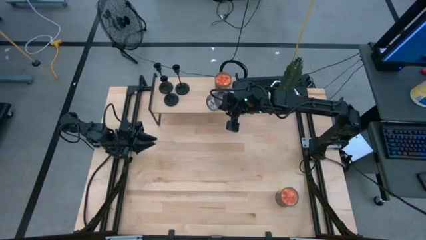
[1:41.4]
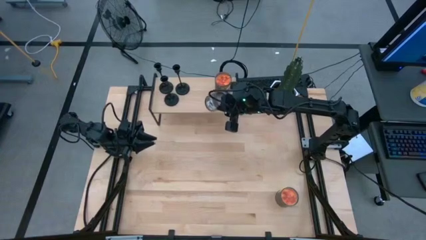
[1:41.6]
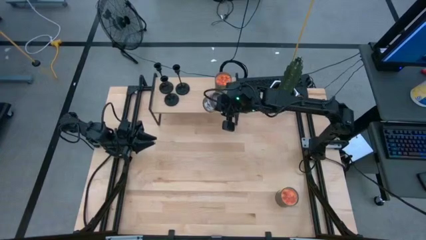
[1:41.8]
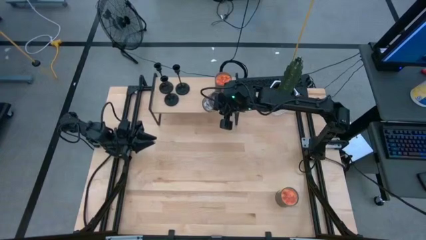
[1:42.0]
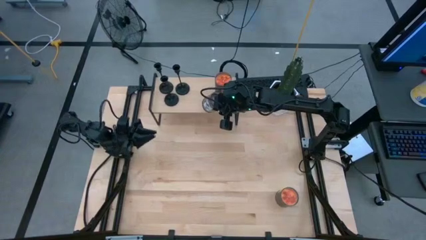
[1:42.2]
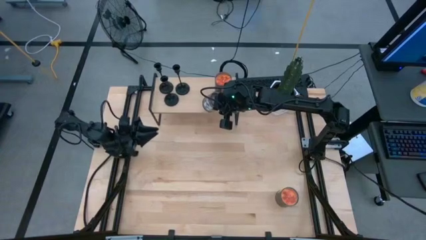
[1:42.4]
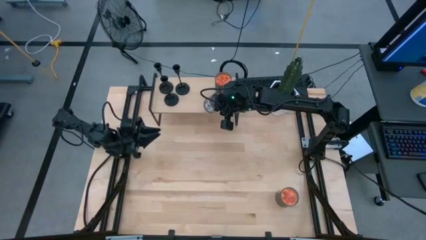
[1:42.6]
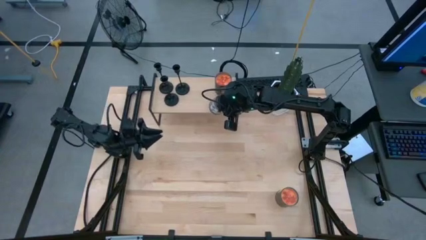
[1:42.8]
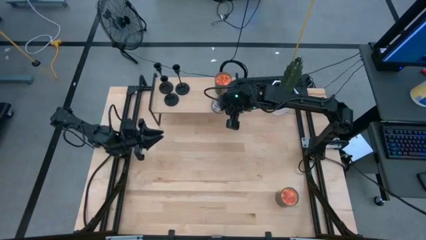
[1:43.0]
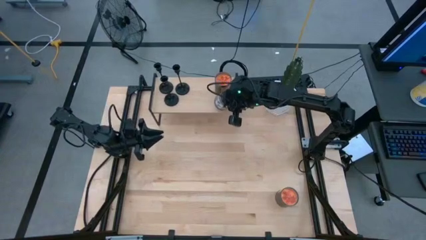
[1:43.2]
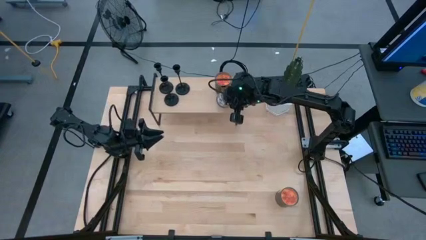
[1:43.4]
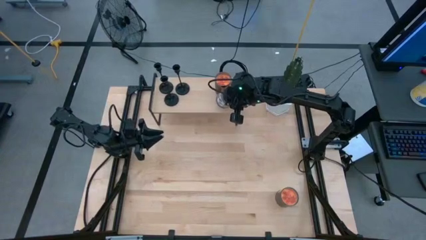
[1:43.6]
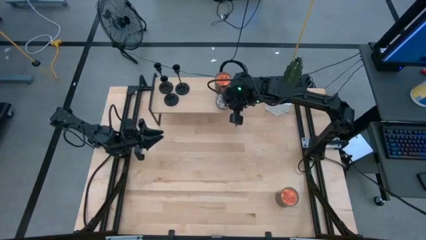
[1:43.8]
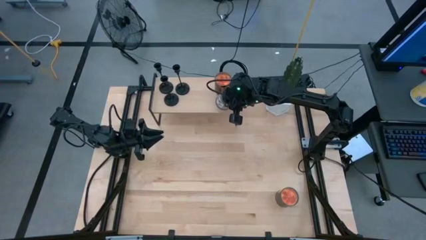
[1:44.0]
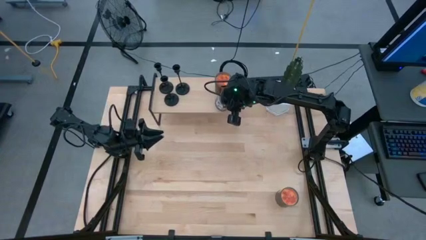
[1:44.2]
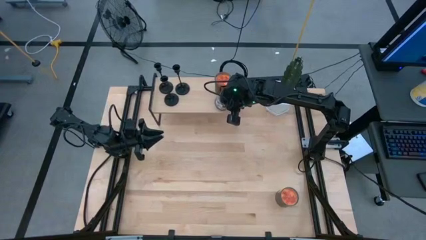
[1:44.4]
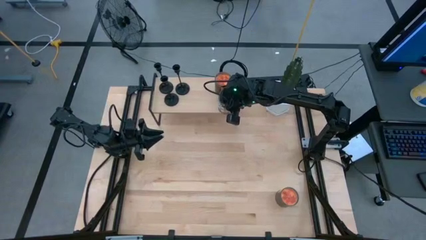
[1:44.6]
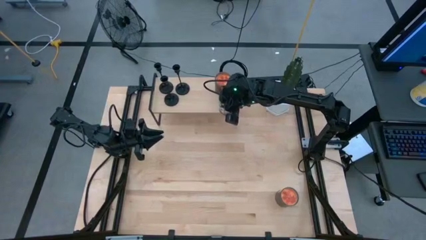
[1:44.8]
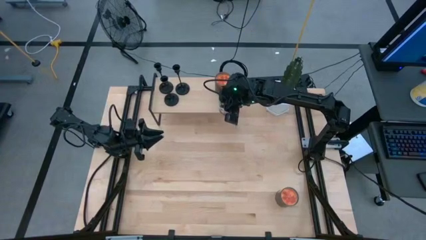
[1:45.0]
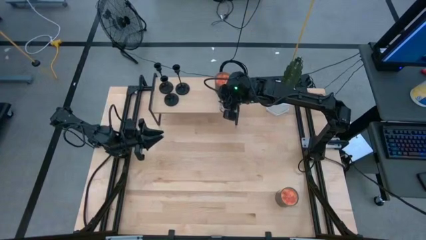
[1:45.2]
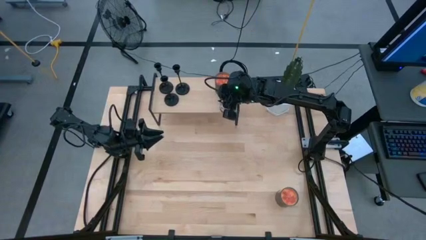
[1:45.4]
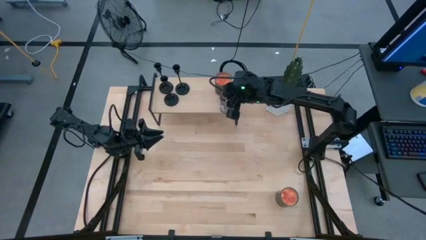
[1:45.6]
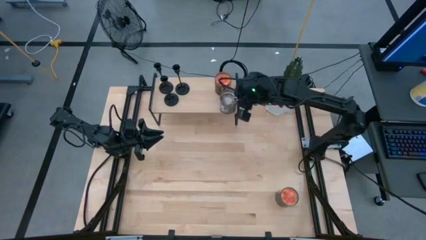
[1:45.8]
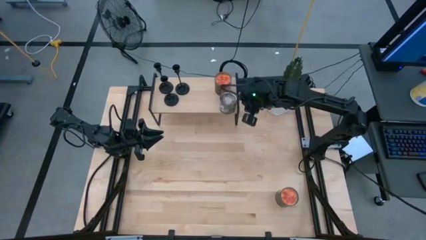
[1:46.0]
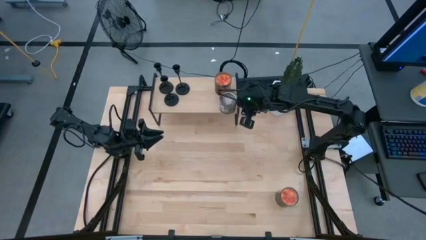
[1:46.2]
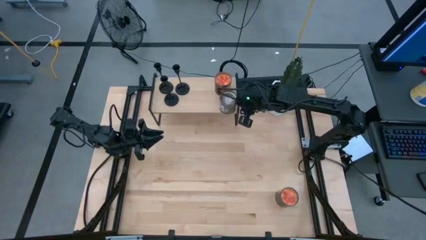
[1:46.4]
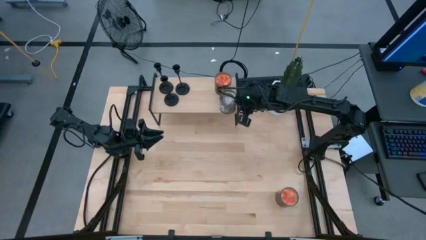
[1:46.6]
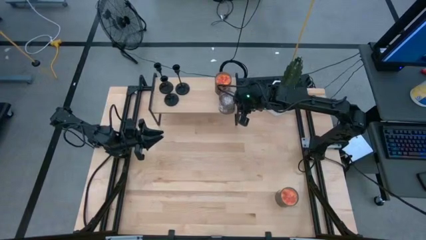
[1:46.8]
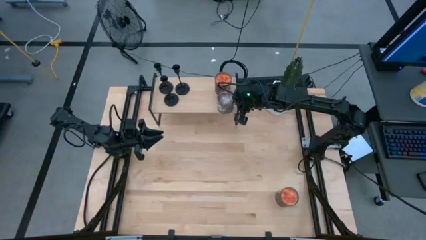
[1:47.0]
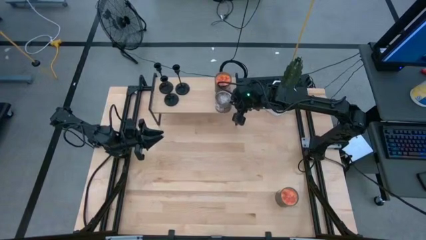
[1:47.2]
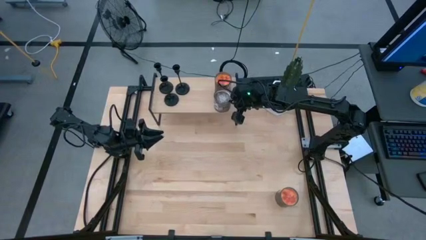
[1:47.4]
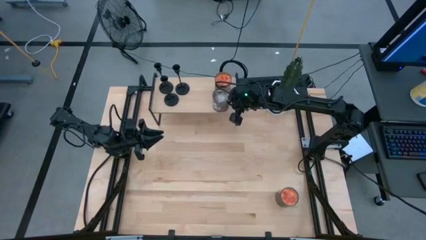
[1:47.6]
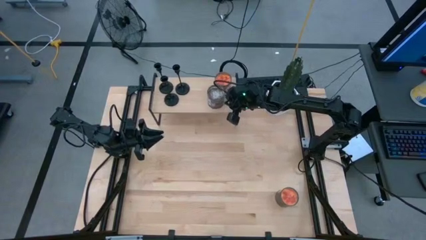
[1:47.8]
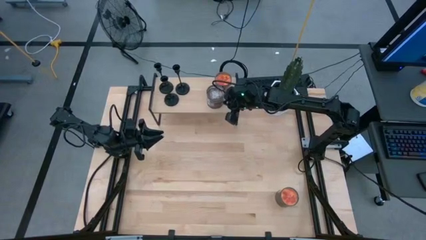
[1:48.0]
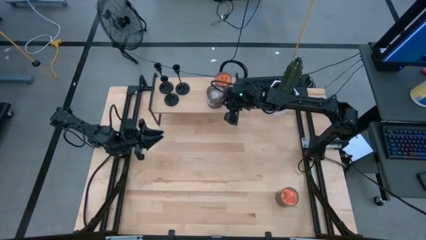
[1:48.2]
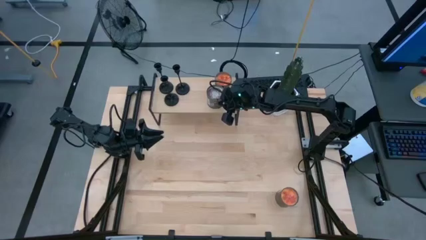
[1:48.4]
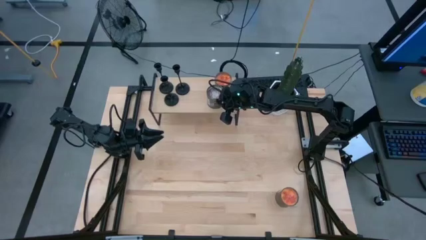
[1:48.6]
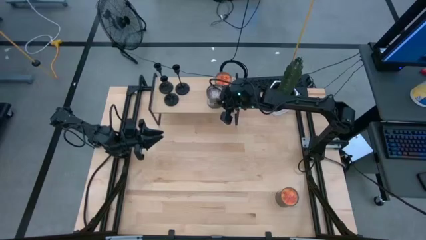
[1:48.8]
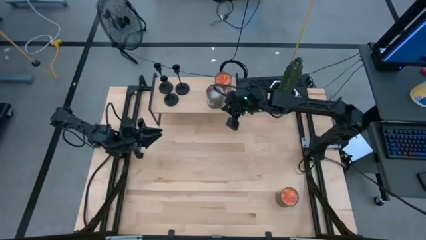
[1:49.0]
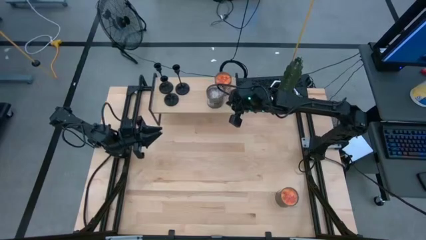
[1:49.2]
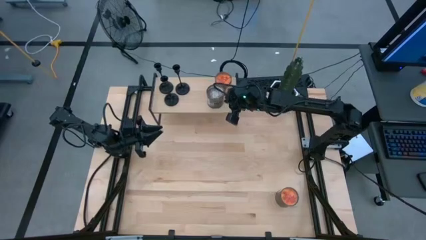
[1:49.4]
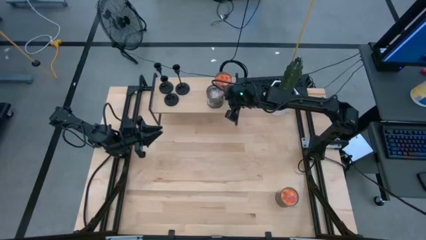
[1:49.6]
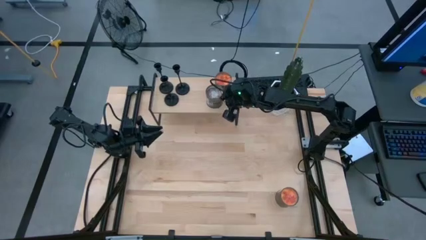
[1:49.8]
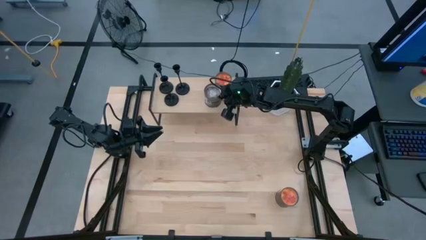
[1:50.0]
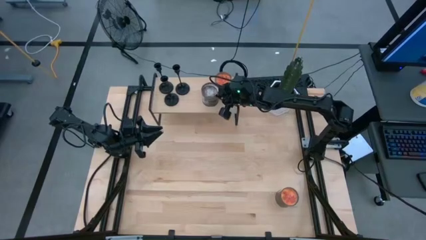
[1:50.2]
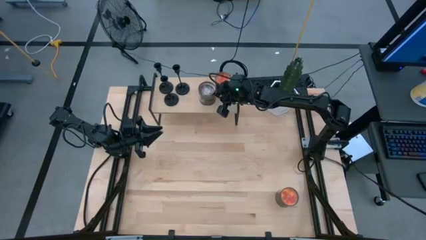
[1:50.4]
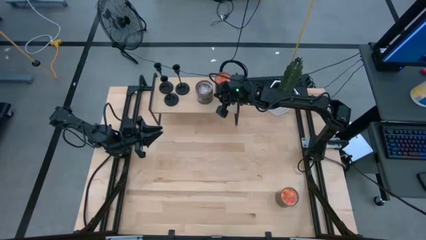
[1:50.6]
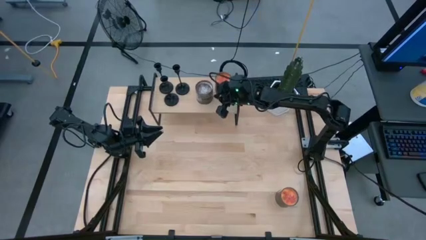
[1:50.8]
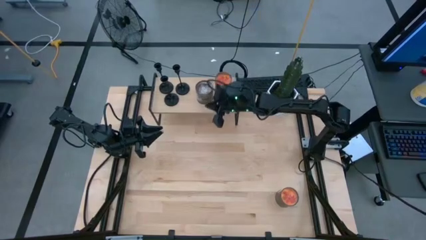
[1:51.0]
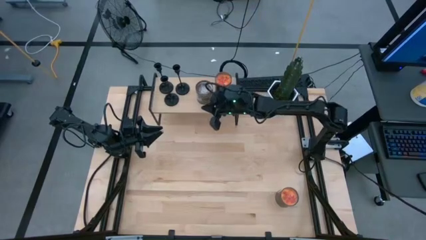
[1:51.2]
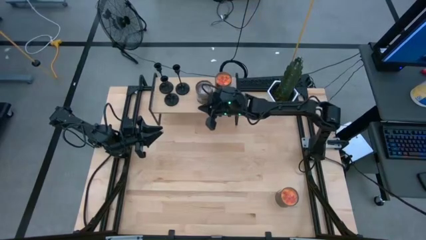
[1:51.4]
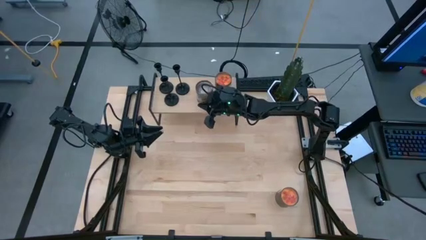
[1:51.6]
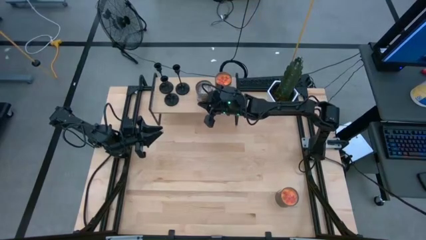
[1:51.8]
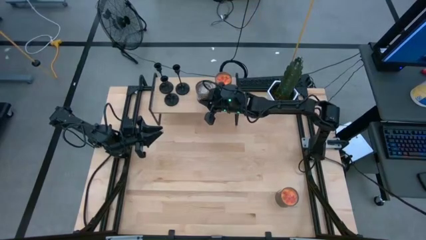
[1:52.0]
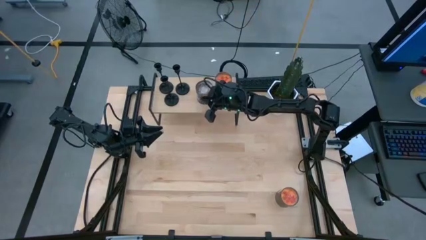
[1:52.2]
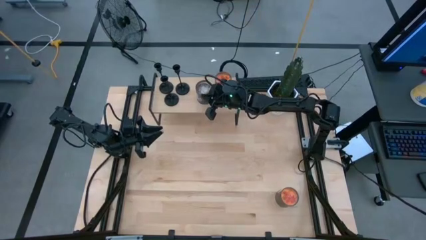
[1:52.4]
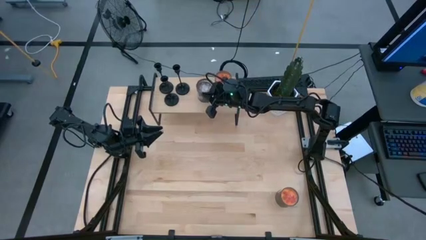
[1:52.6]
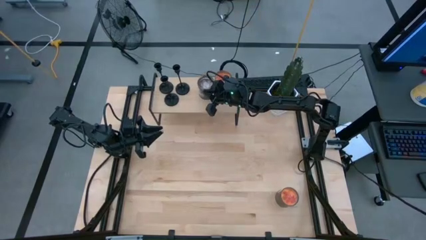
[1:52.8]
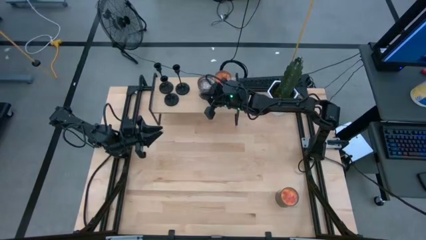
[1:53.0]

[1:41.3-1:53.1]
Task: Pick & Place candle stick holders
Put the brown scented candle on the shelf

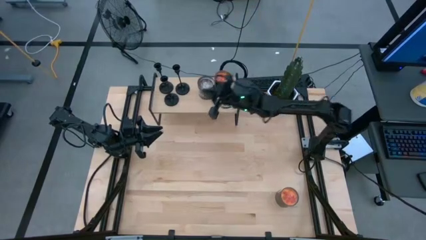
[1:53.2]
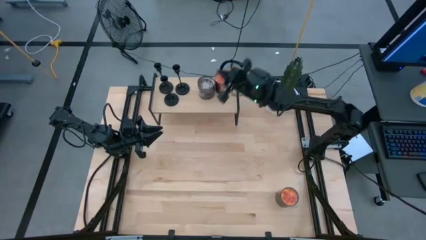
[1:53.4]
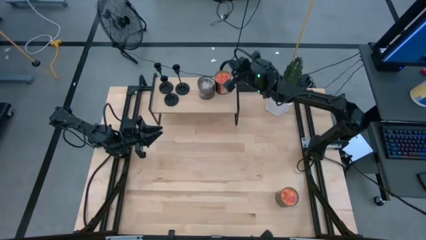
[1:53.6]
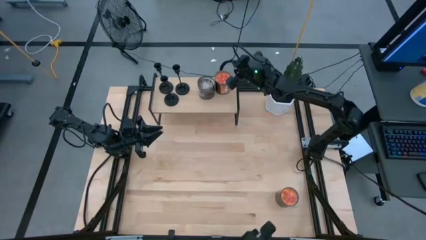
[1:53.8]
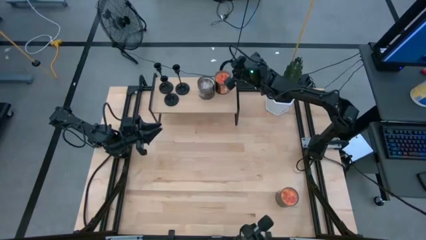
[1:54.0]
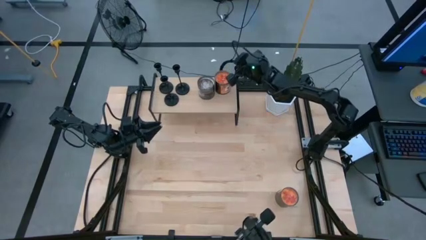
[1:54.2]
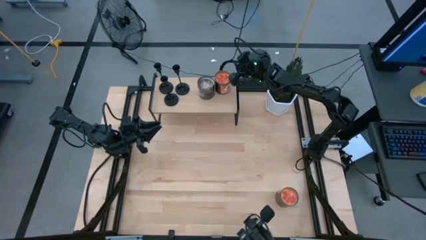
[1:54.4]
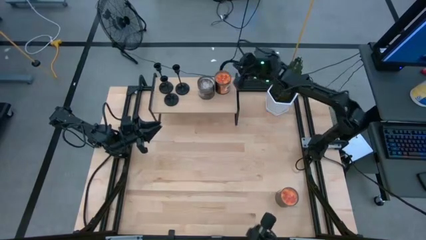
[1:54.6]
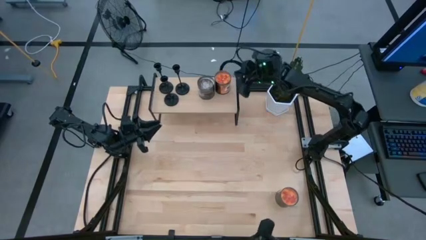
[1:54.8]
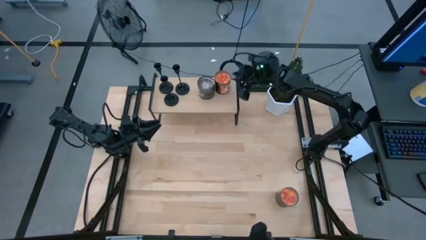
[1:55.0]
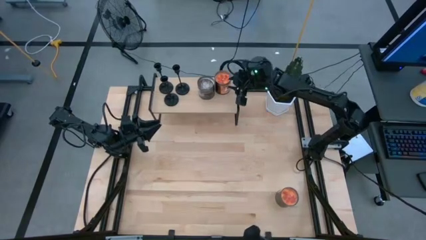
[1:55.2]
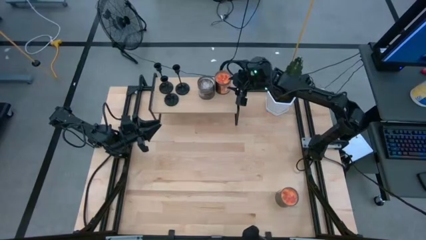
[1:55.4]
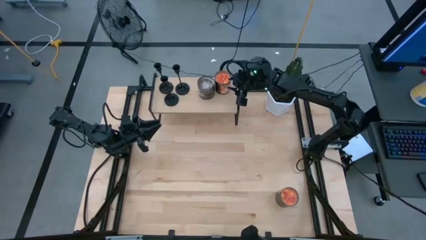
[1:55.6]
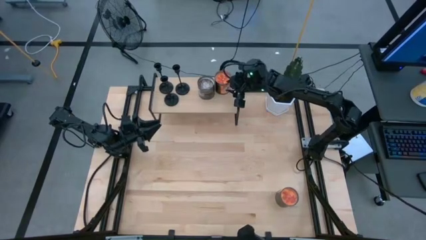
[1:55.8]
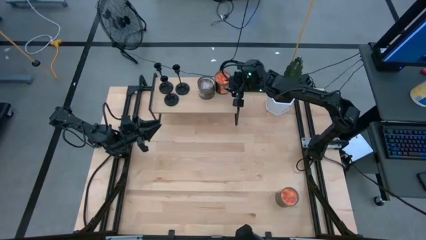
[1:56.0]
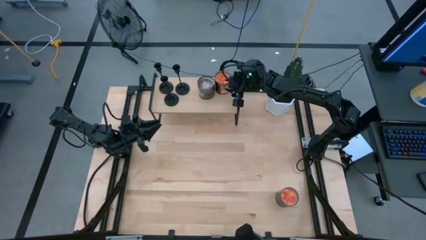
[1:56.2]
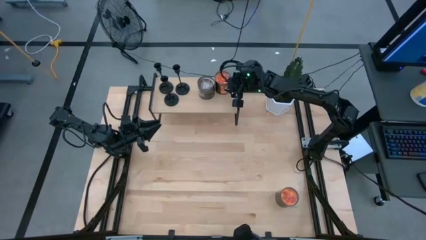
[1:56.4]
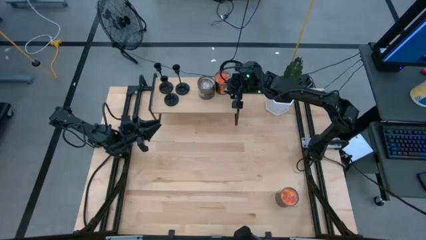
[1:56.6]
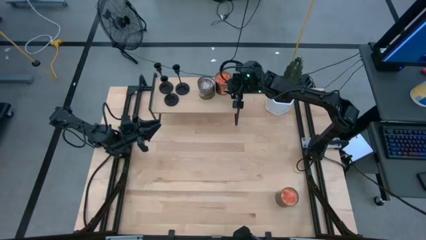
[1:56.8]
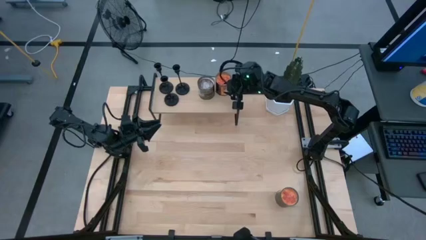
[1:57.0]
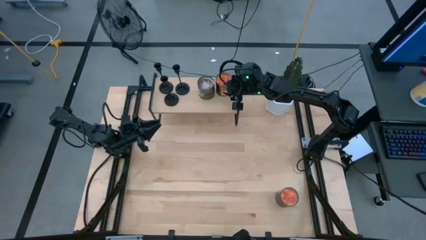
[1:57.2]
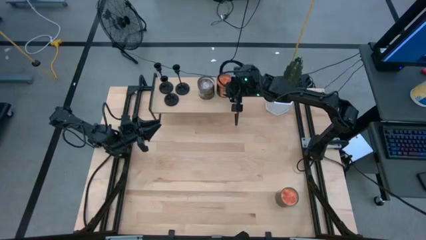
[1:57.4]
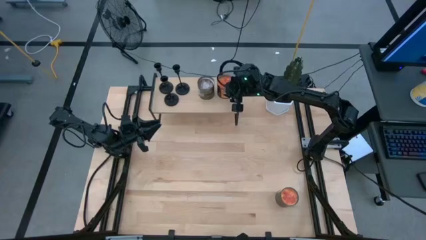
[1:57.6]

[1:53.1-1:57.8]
Adjust the orange scented candle on the shelf
